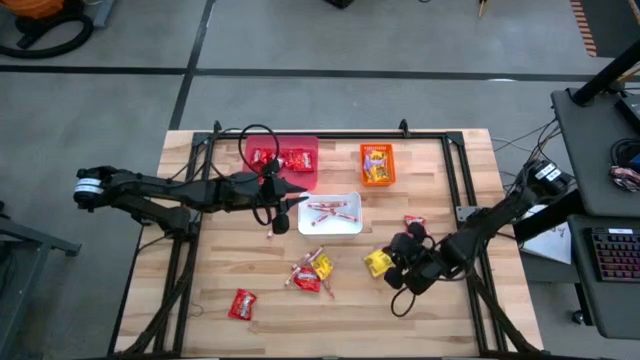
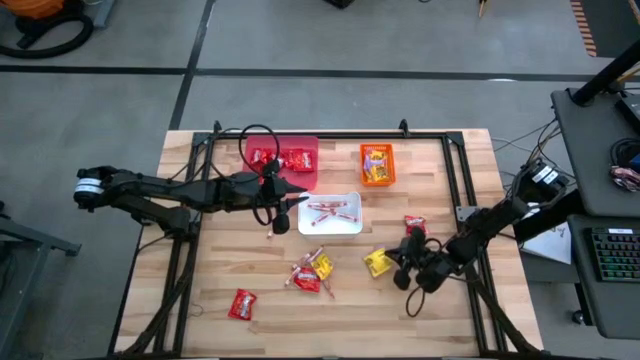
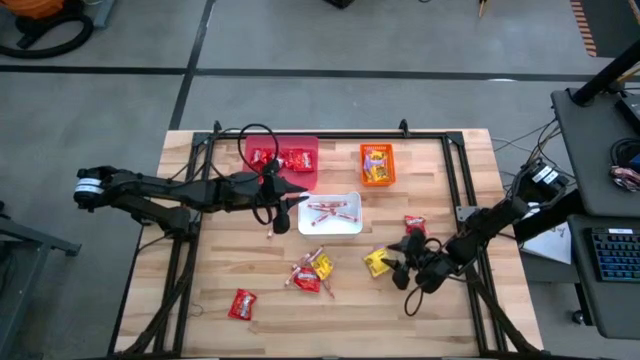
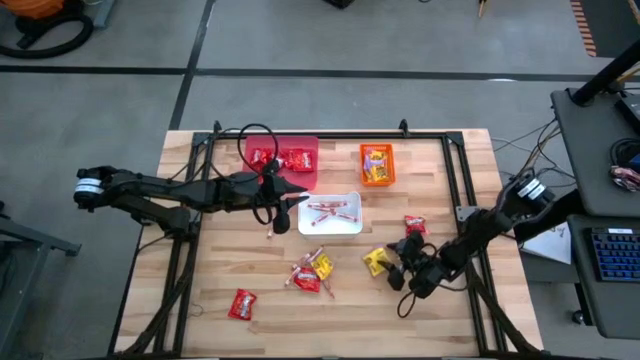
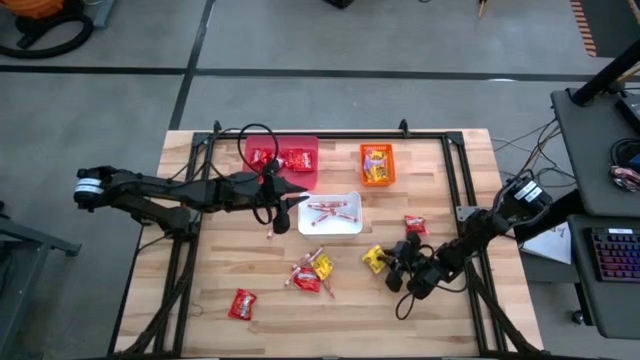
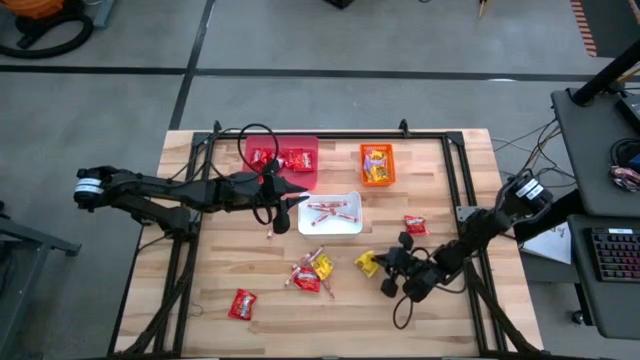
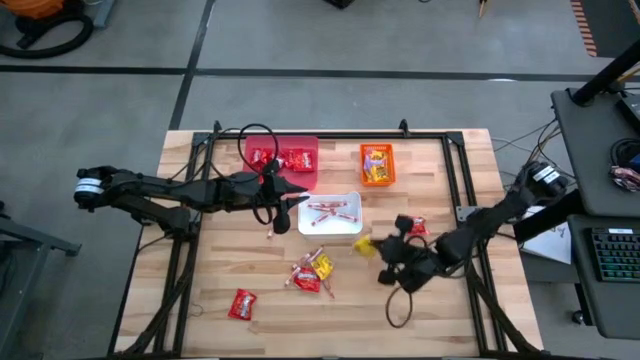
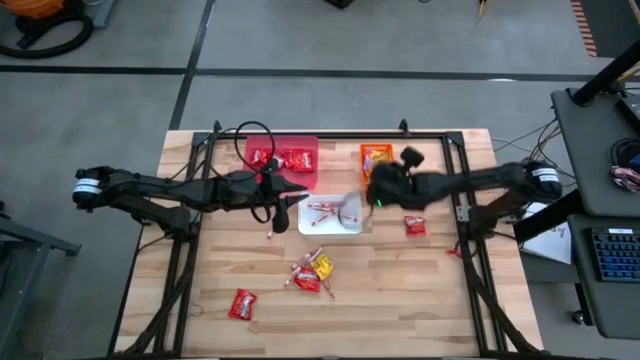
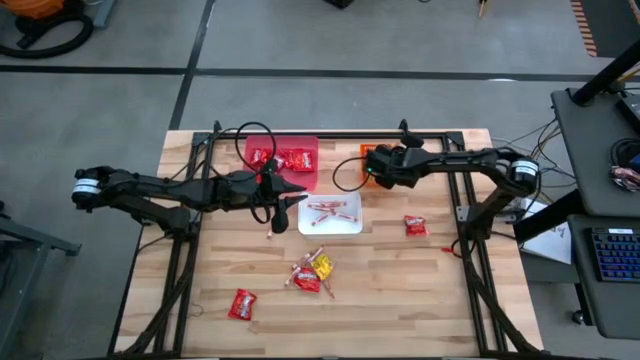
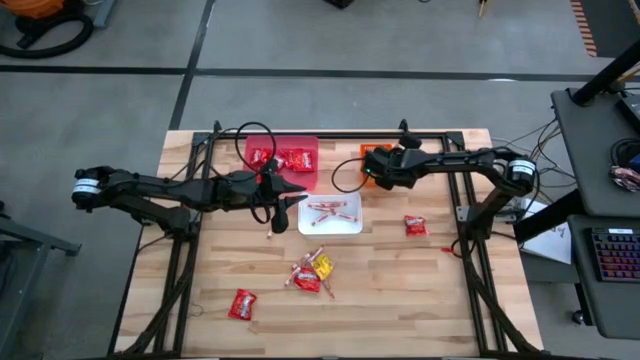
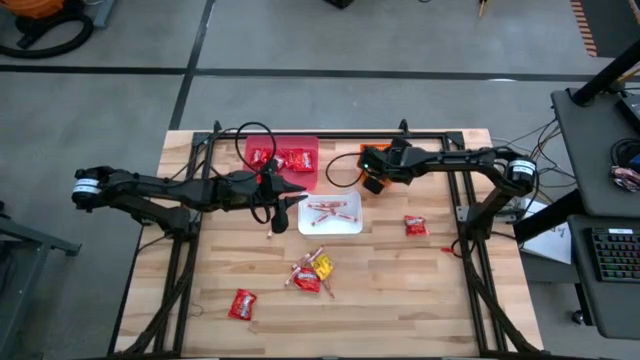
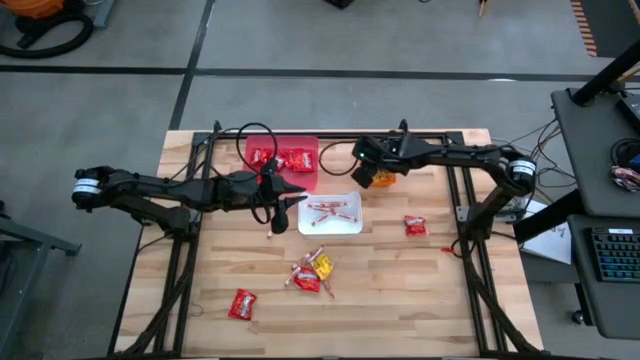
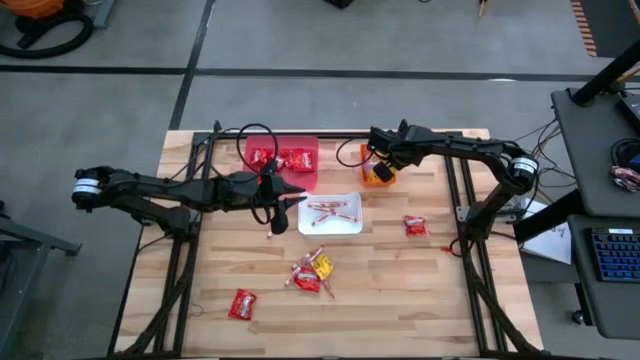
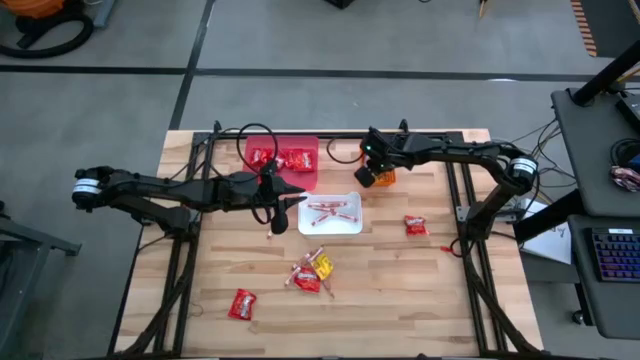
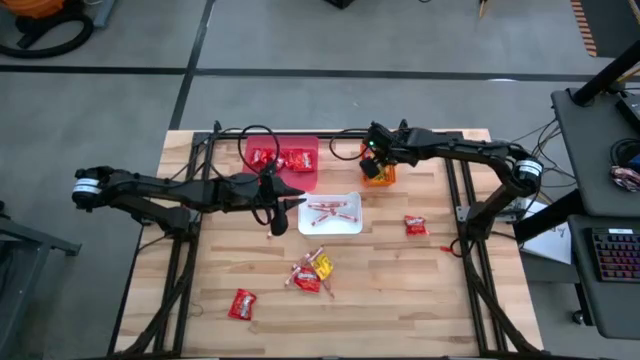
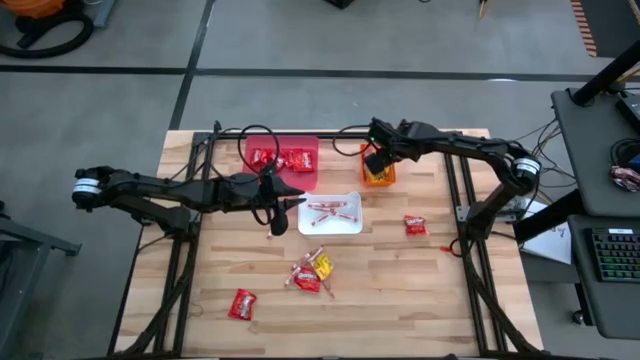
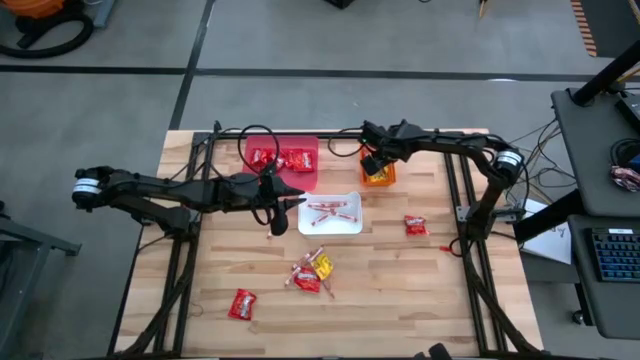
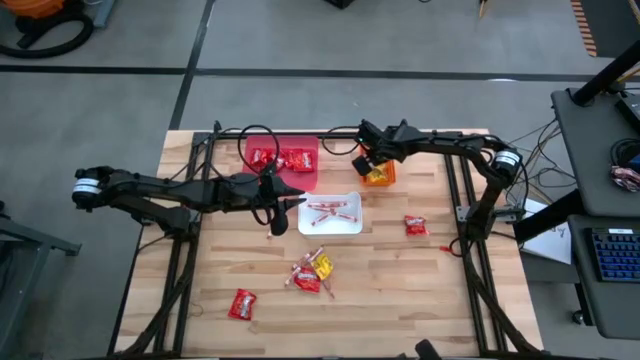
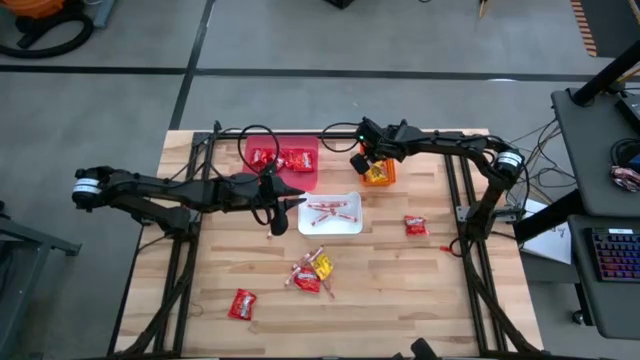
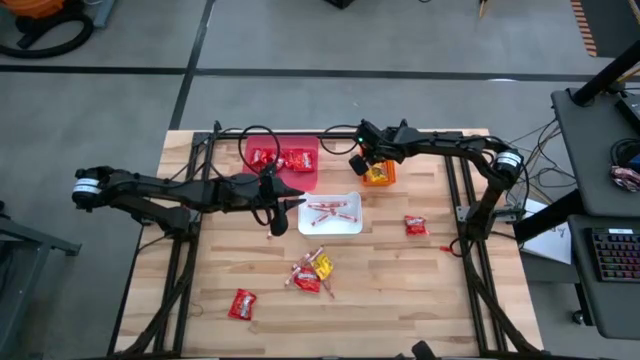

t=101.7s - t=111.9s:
Task: Sort candy
Put the yellow candy into the orange bin

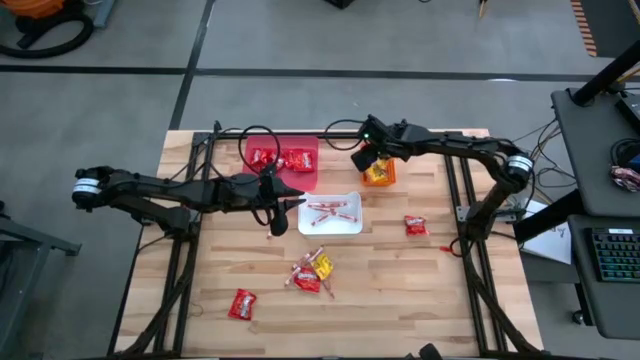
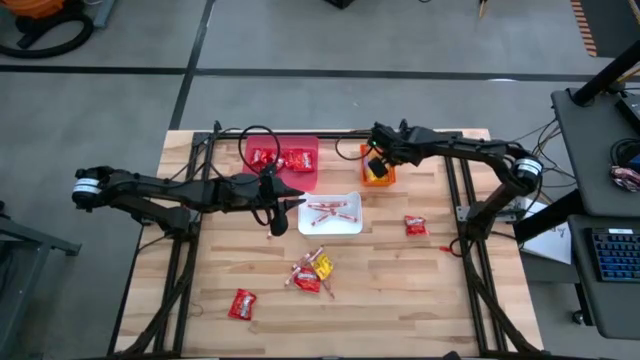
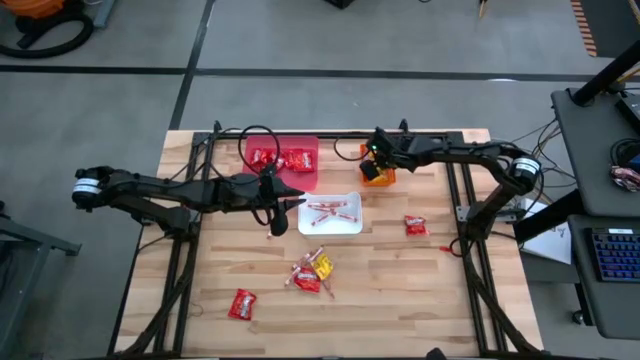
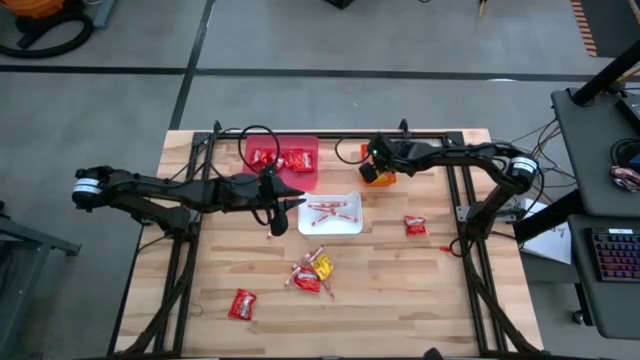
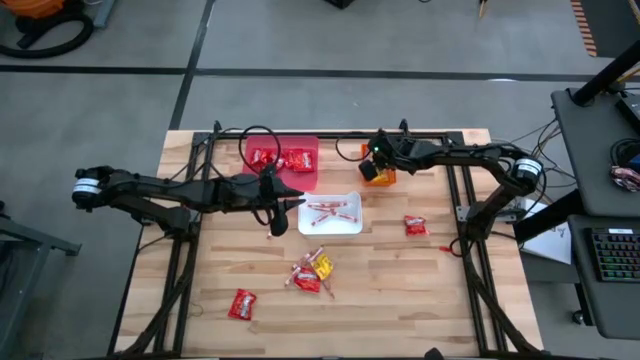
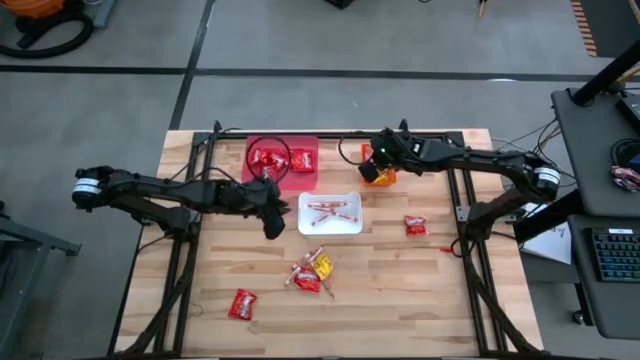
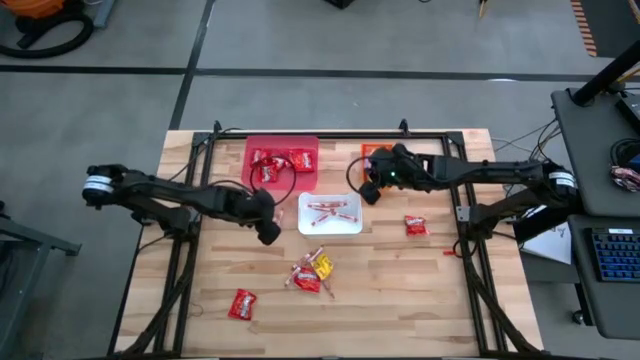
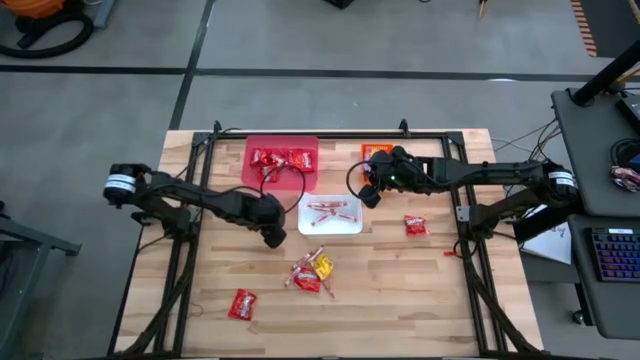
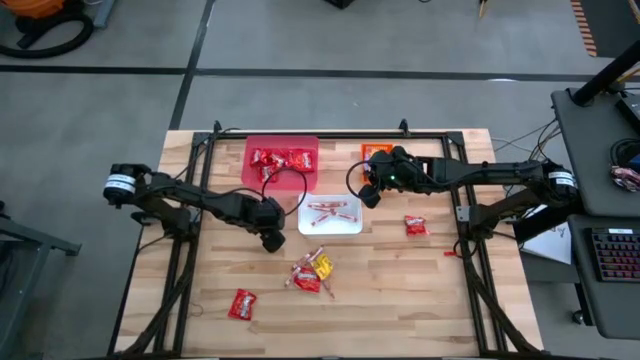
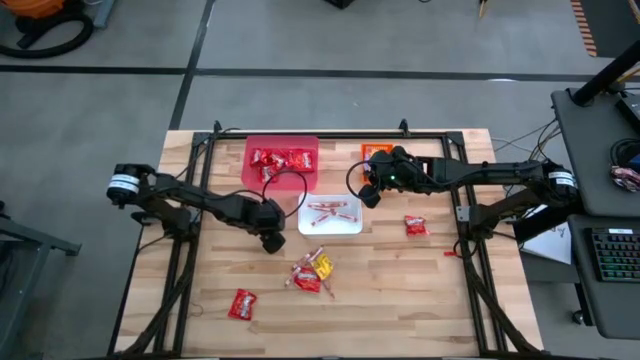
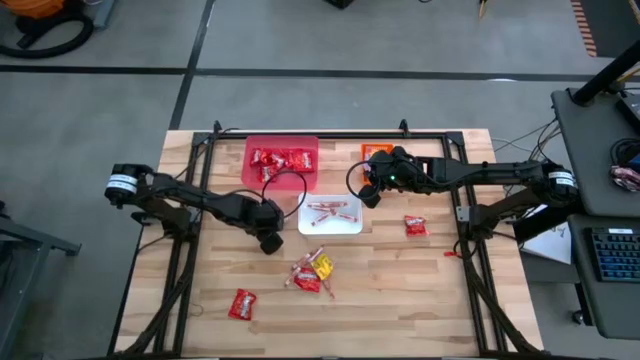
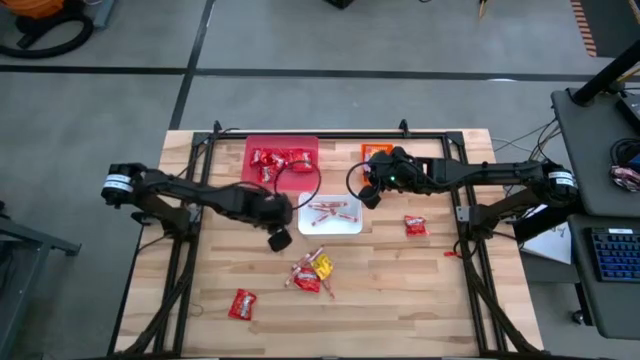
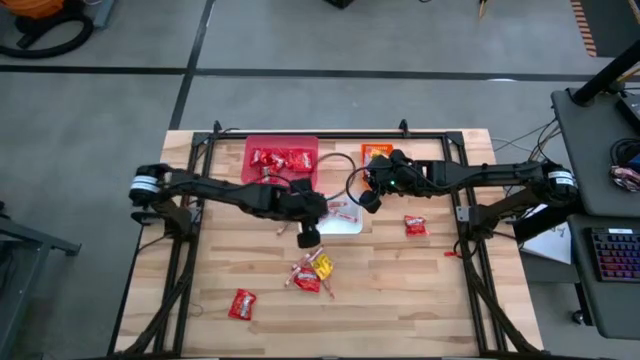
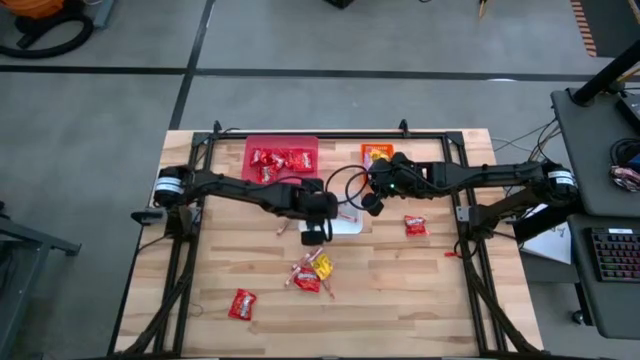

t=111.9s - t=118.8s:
Put the white candy into the white bin

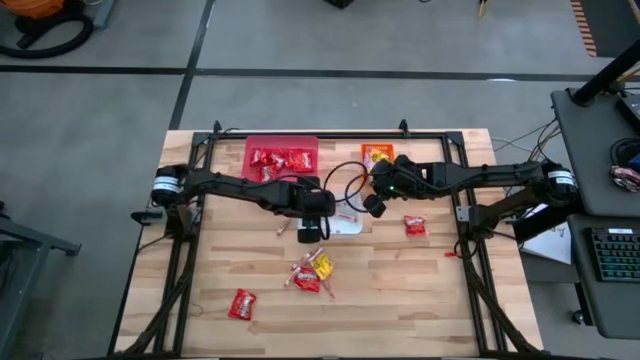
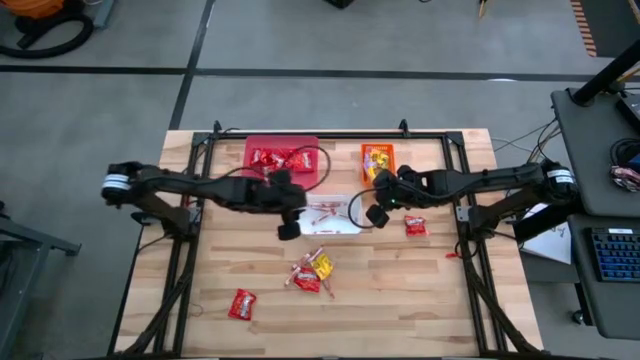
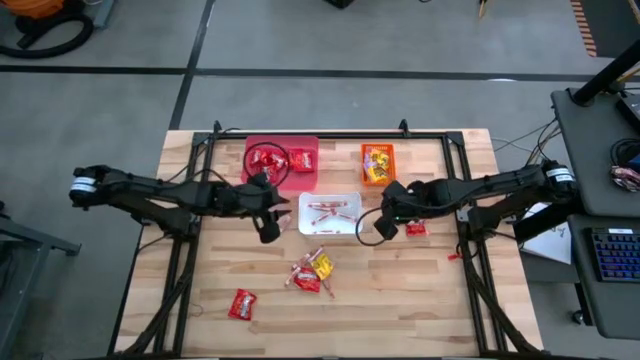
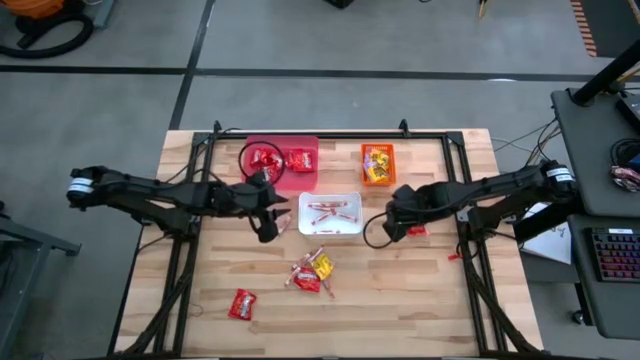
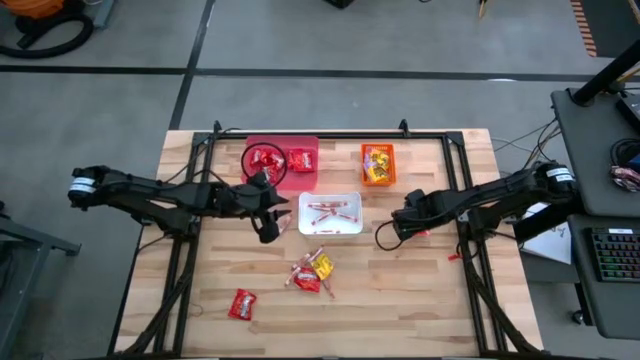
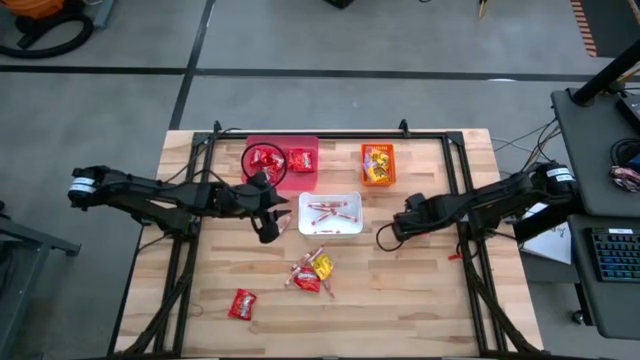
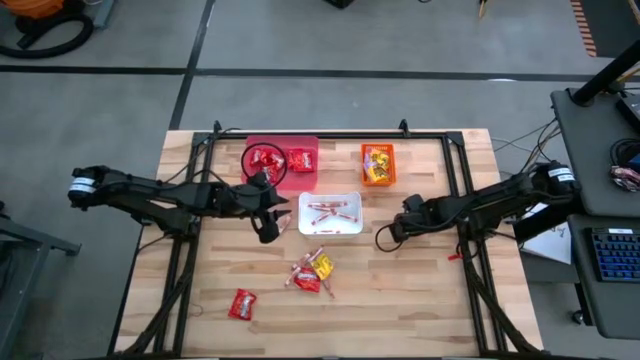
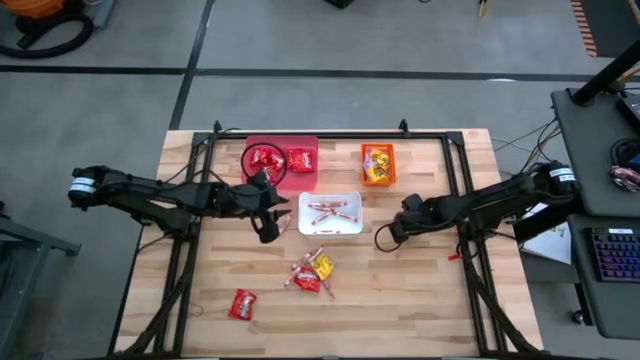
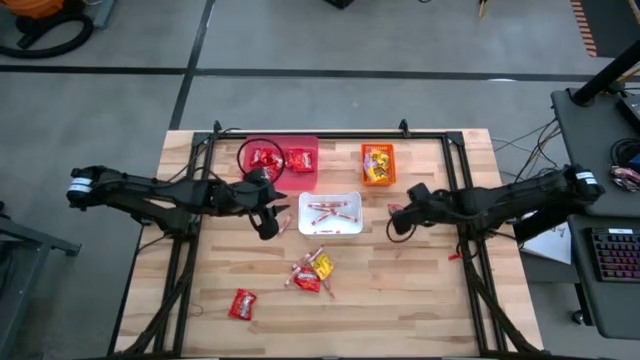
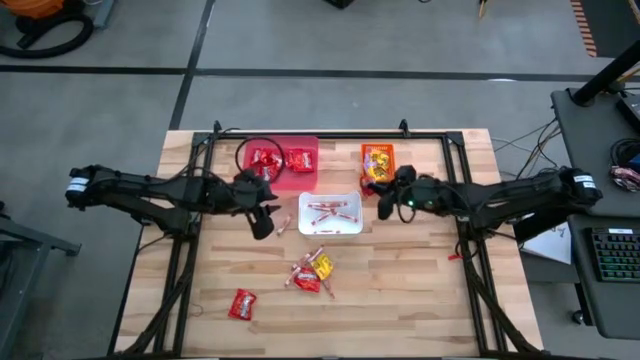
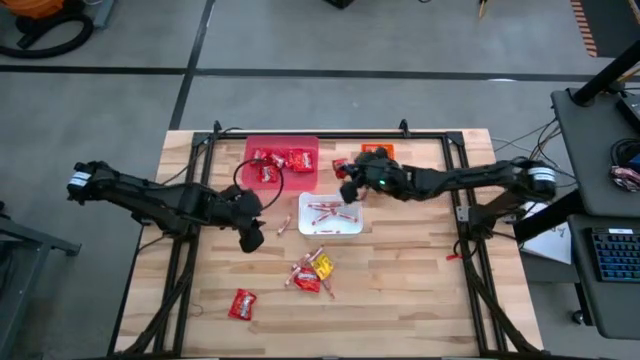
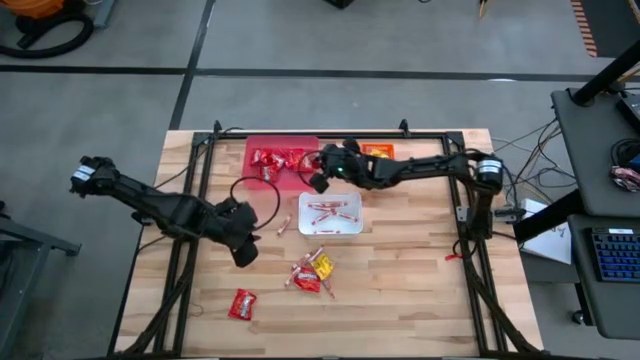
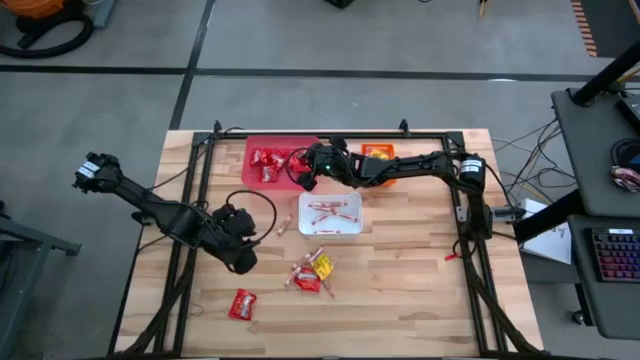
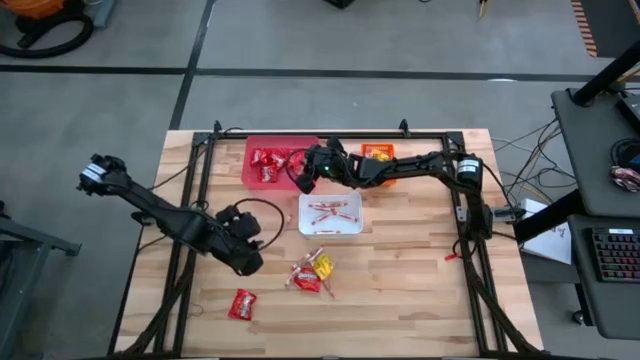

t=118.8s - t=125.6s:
Put the red chocolate into the red bin
